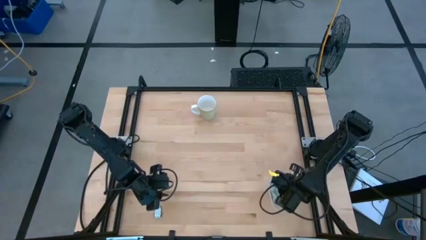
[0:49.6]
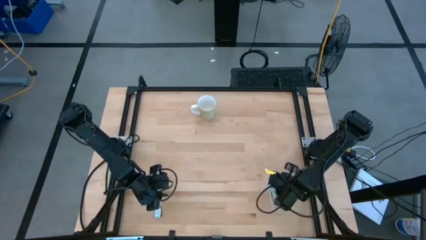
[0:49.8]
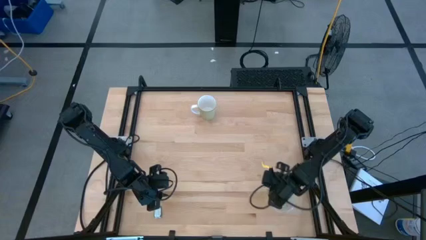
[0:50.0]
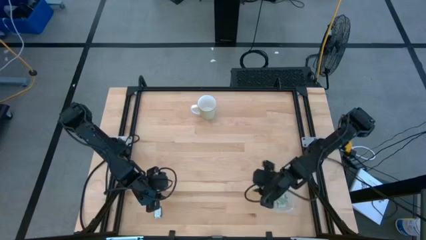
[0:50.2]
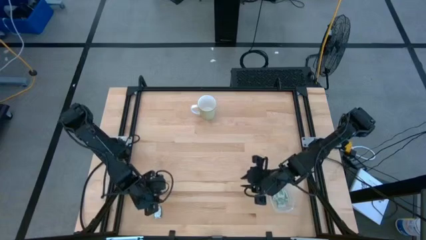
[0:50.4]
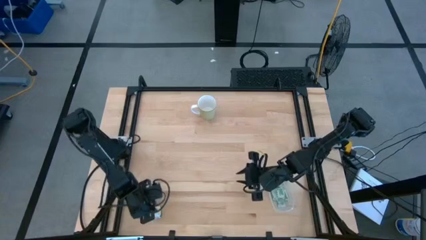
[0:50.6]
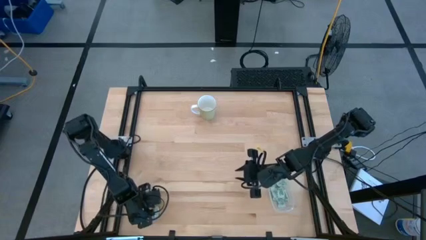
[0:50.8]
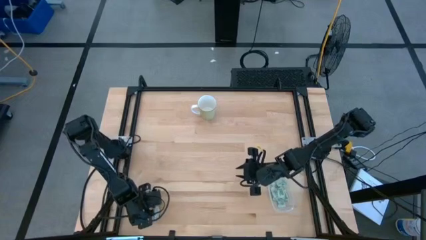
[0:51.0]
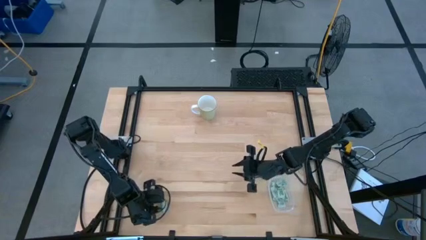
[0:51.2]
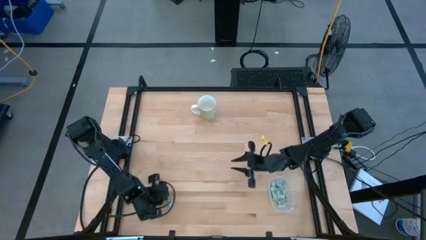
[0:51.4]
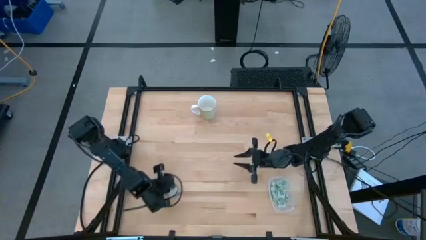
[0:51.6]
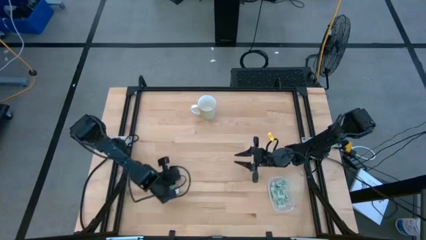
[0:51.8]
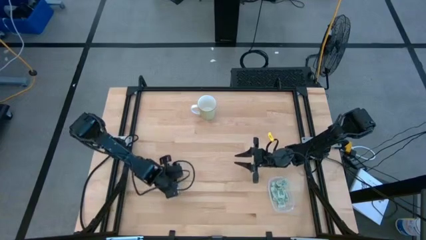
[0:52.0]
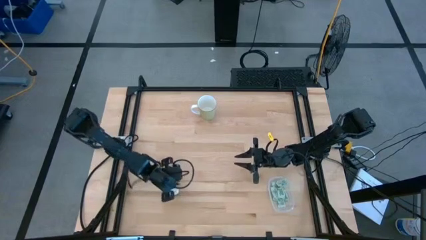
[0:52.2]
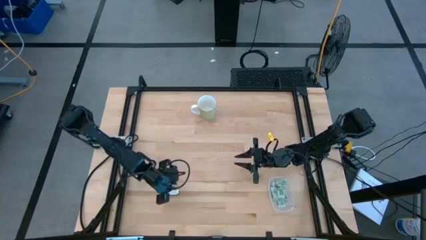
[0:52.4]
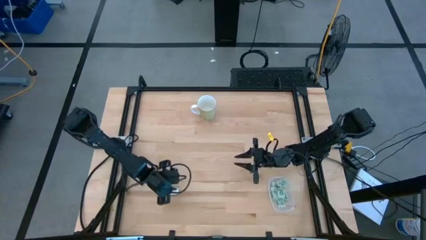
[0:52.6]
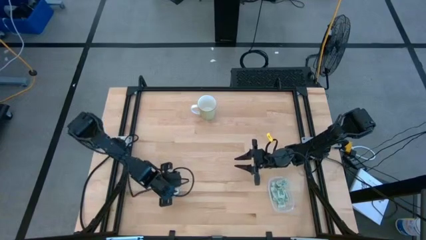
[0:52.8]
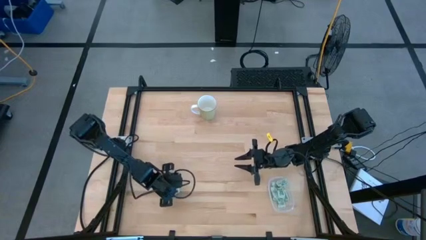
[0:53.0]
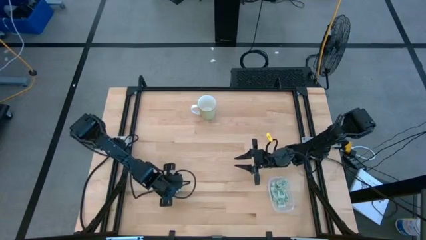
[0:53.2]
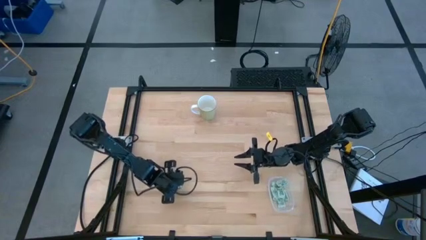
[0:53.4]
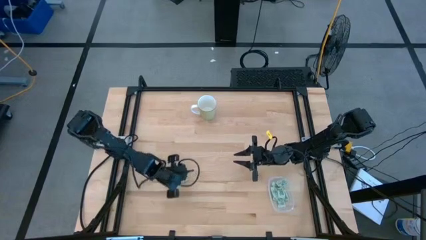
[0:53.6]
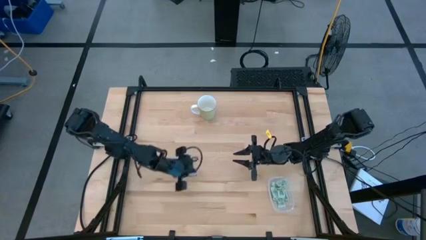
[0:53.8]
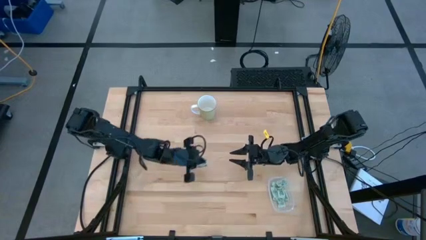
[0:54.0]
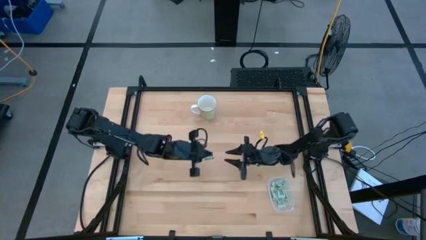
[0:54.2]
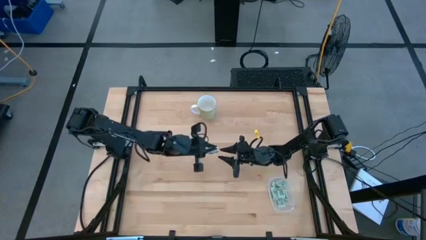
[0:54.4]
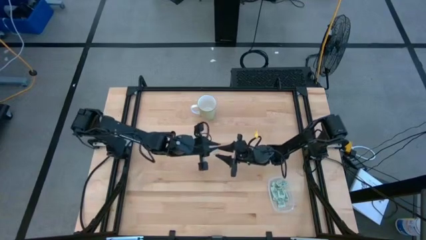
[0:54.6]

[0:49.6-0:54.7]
Task: Pick and place Stevia / Truvia into bins
Put the stevia packet into the transparent bin

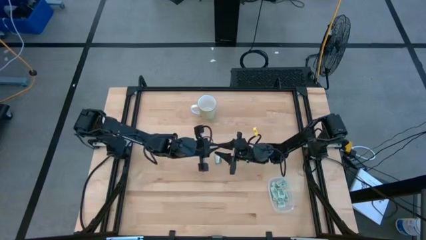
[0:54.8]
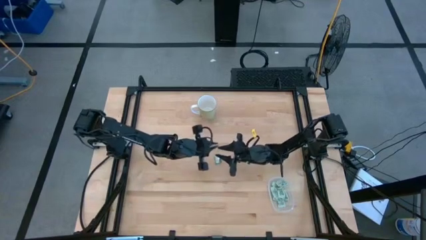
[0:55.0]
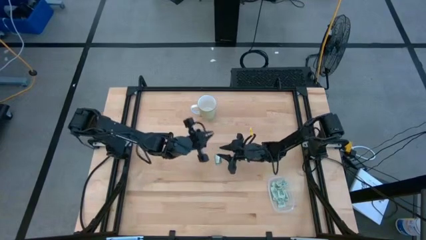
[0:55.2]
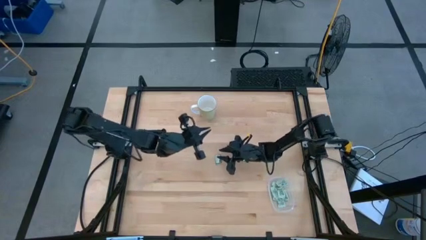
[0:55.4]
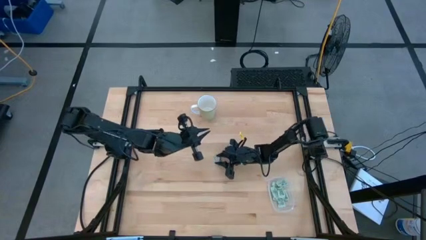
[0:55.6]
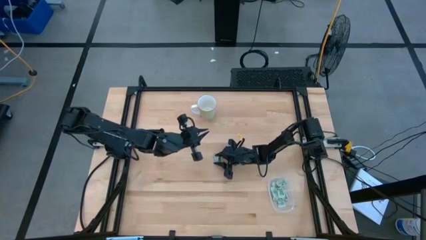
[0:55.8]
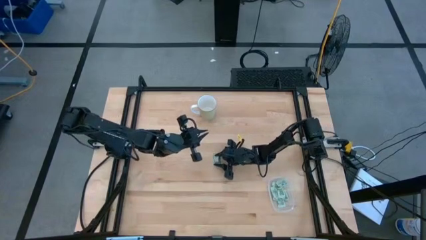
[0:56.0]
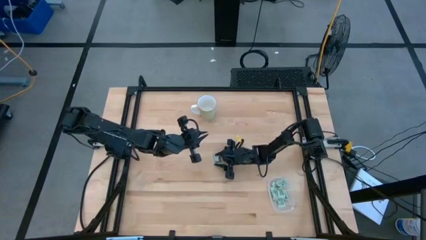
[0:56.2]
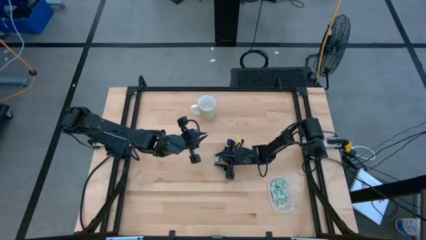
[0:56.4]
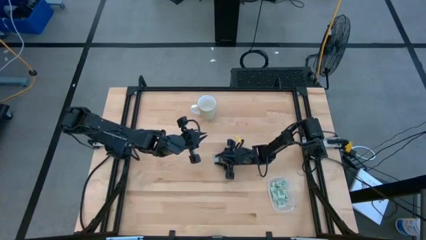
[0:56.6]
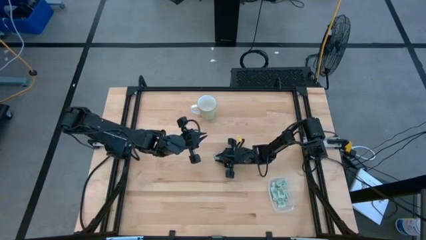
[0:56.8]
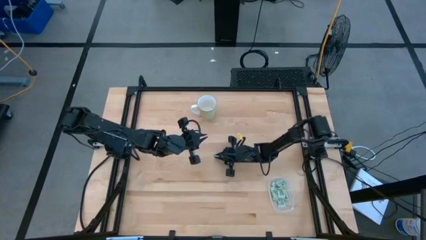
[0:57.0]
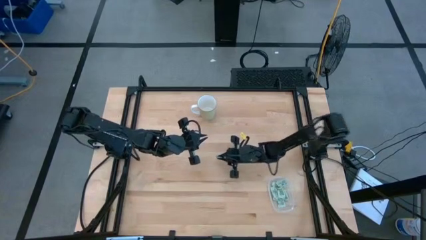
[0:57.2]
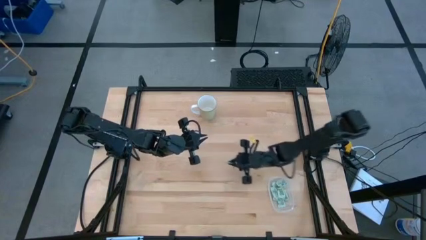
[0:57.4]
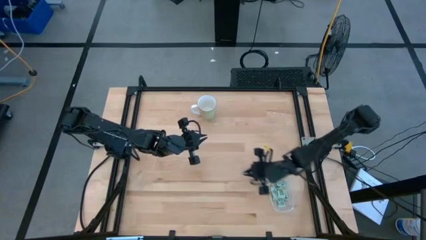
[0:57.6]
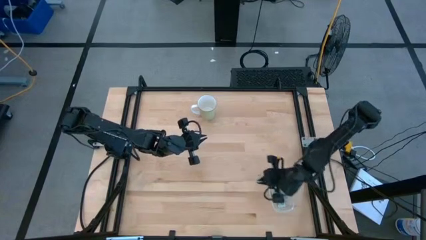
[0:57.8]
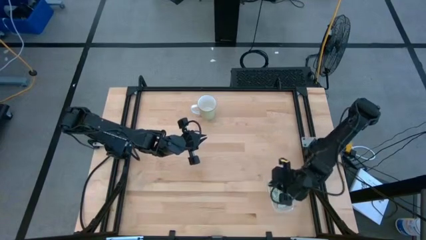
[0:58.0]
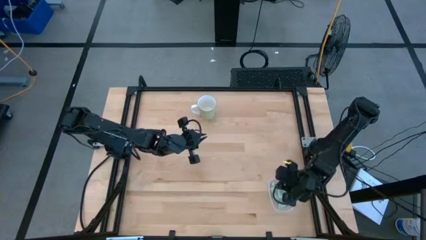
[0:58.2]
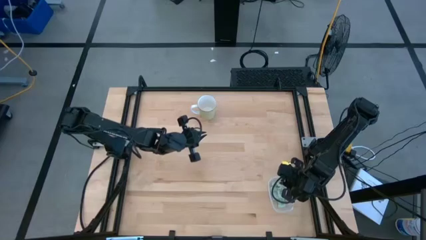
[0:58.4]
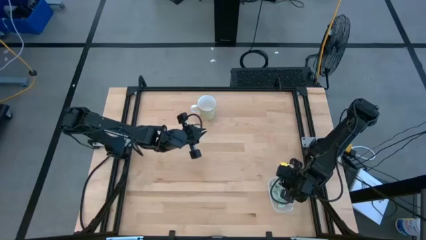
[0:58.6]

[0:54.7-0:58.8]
Put the stevia packet into the transparent bin

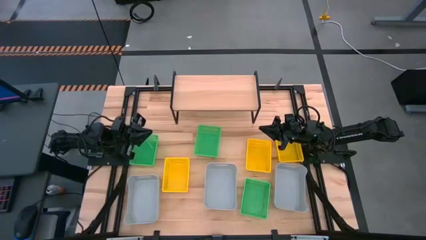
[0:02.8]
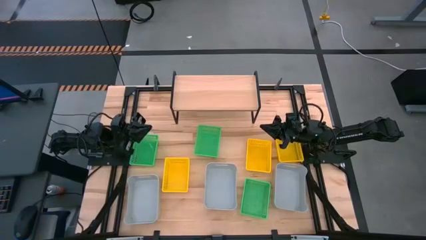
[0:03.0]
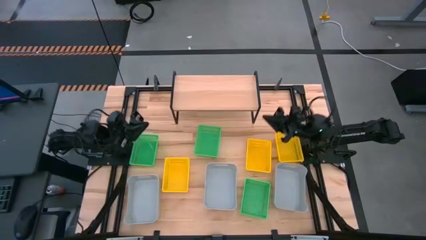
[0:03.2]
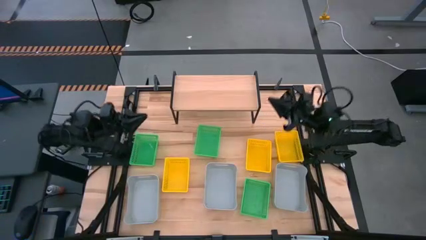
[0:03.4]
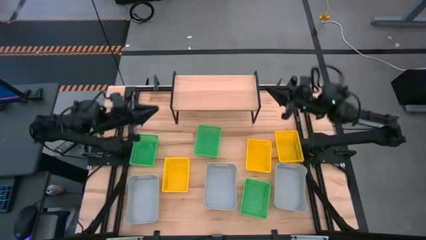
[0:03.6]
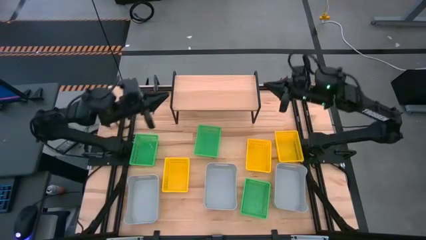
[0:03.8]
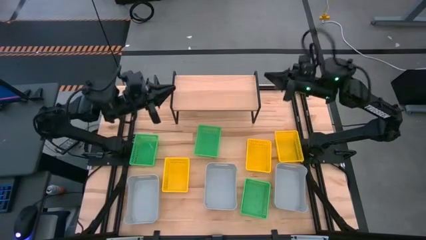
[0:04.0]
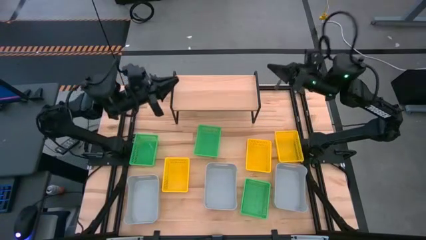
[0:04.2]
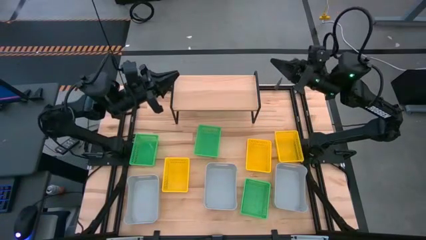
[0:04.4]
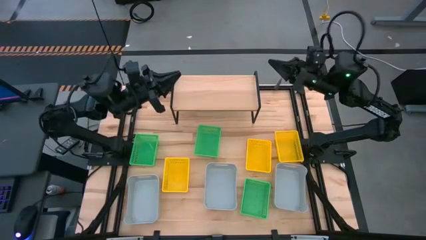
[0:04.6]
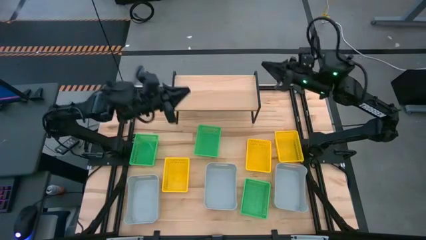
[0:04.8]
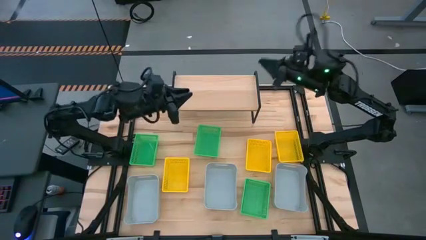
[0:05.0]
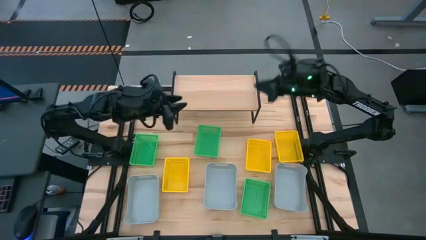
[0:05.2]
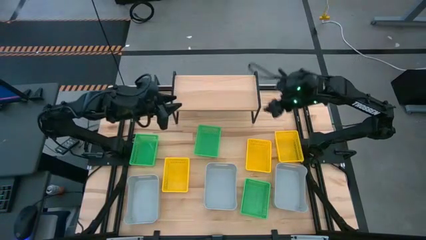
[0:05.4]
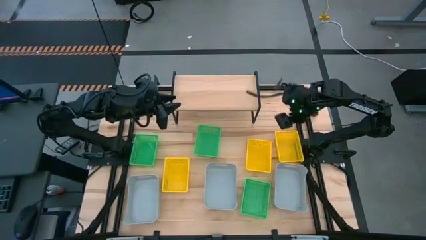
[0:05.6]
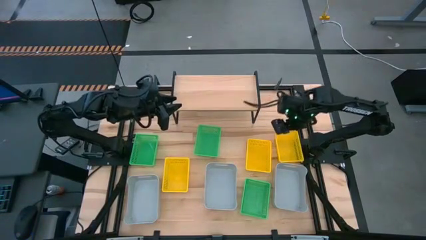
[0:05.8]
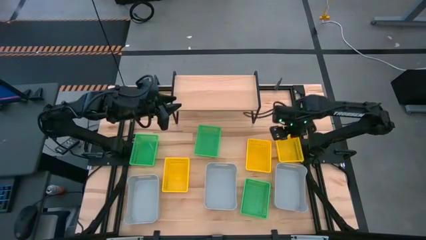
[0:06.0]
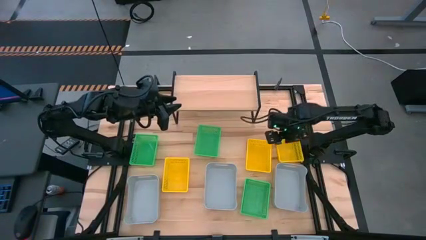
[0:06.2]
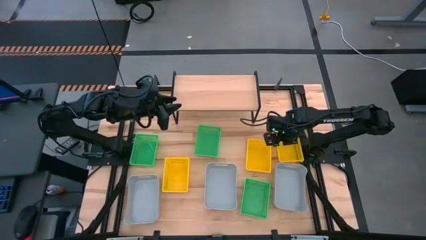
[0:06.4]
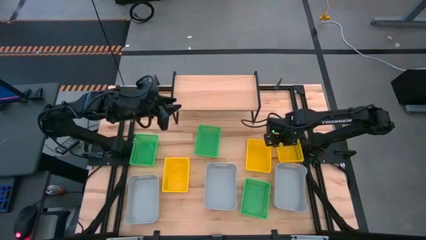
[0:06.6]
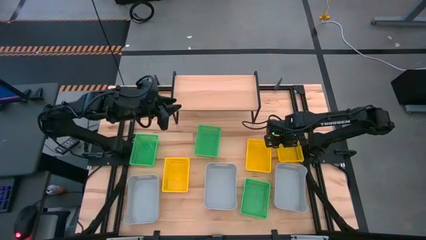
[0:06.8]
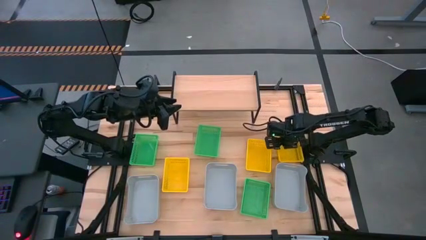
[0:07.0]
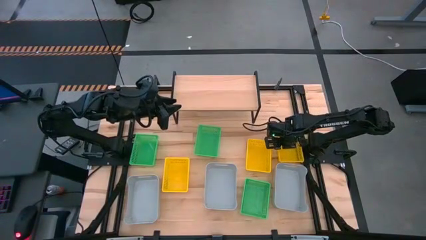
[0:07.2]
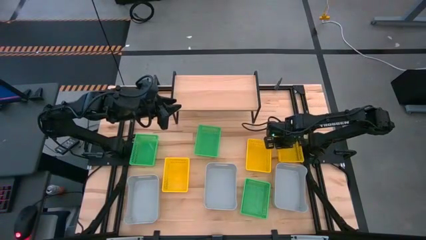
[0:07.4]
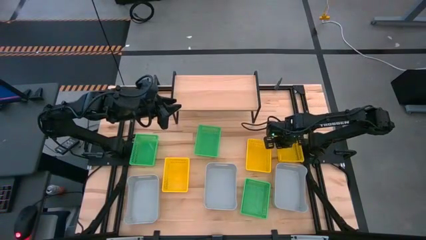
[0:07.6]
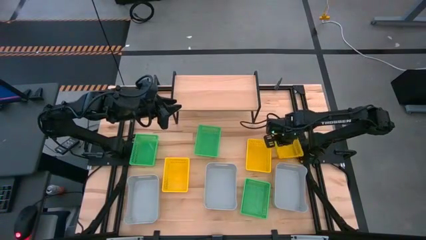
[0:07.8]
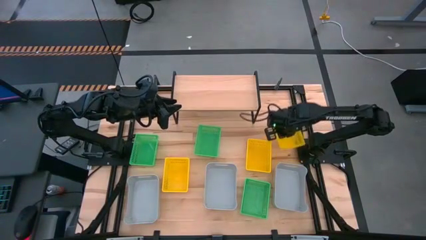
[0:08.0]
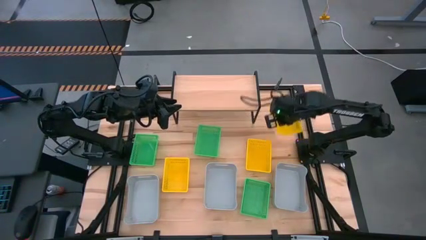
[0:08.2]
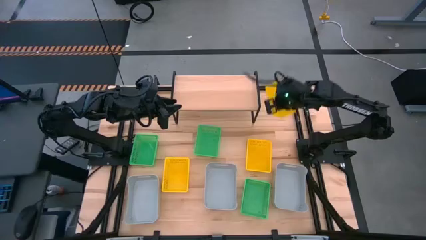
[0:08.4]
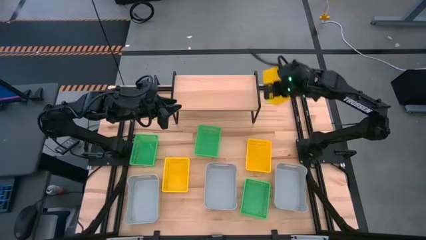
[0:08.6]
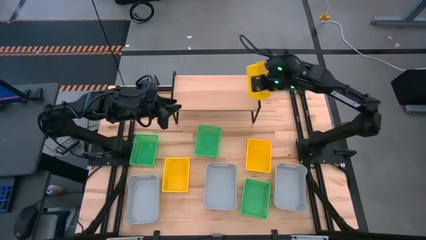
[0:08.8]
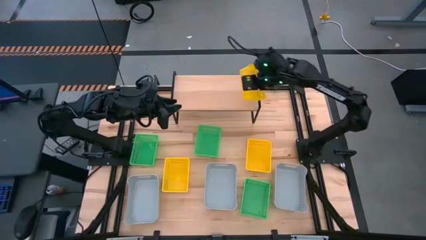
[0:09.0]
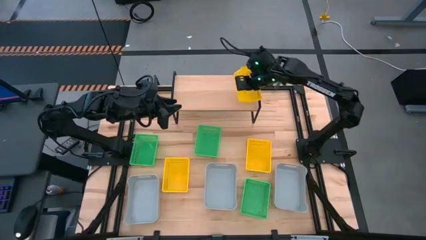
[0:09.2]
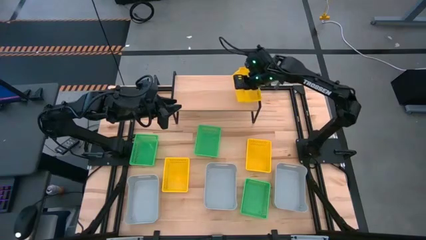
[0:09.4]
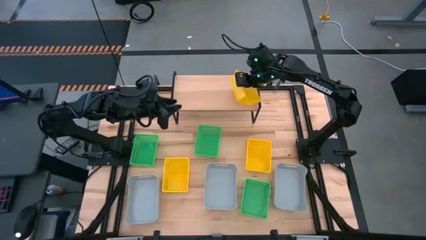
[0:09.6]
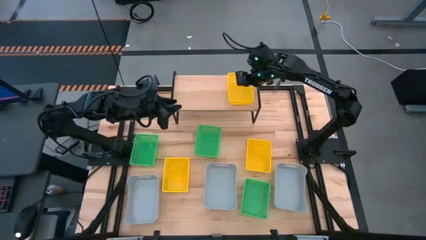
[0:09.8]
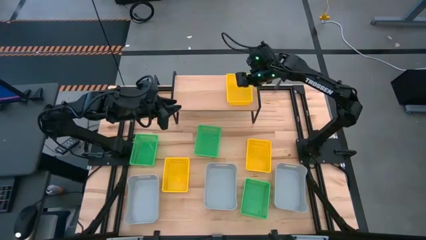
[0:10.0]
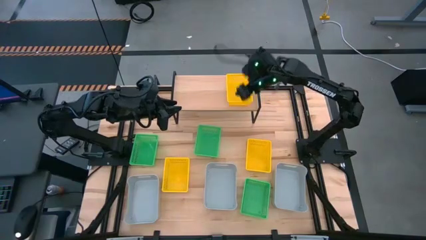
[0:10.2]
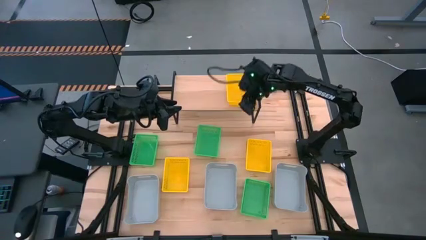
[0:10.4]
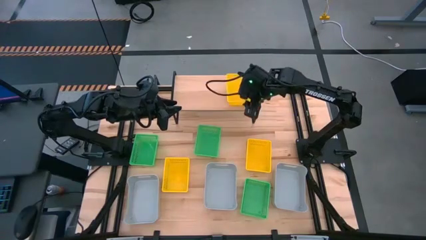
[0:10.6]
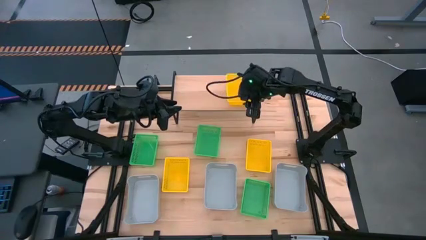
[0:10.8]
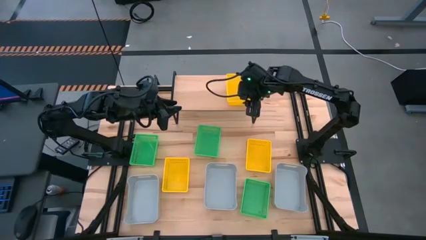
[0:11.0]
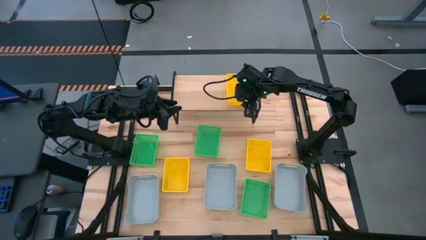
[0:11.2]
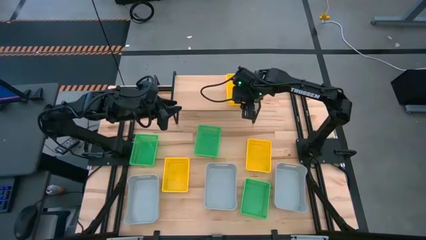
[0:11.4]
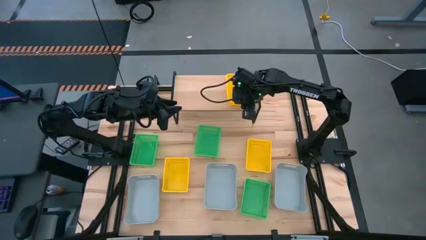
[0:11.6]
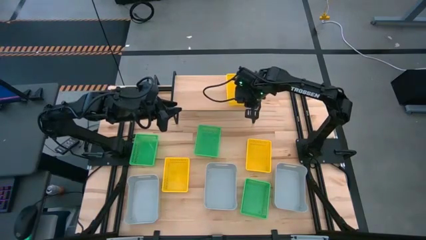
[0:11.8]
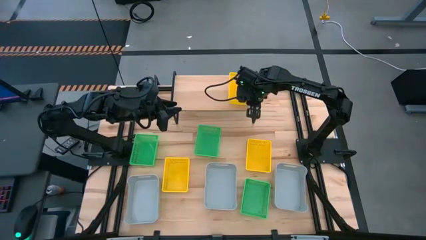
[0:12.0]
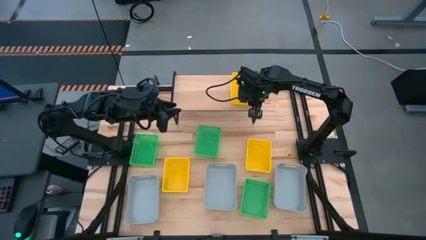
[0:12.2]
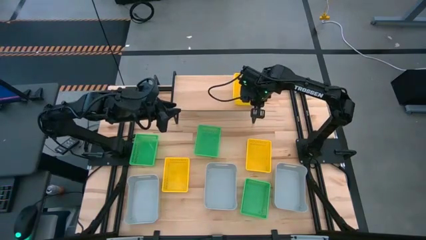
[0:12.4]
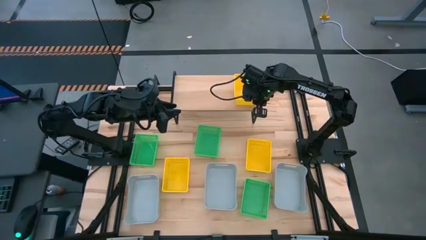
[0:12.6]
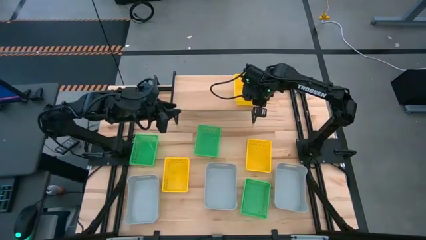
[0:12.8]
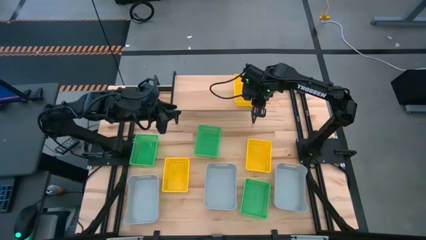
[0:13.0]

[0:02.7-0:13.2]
Task: Stack baskets on shelf by color
Put the right yellow bin on the shelf
